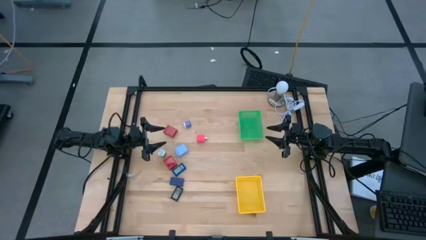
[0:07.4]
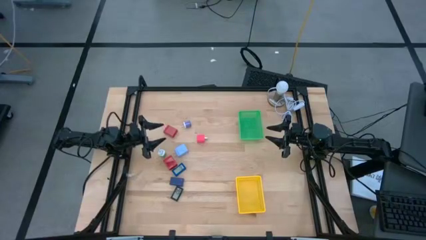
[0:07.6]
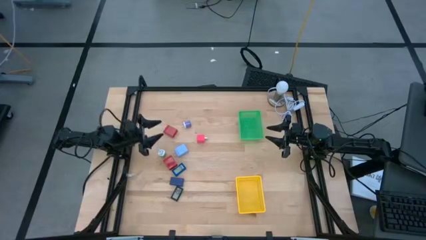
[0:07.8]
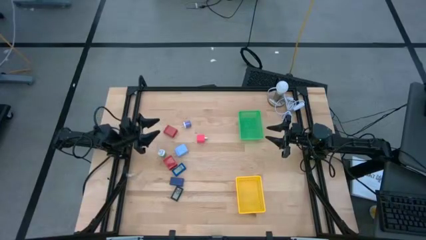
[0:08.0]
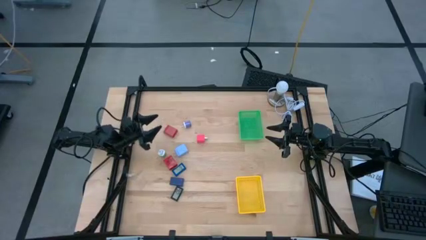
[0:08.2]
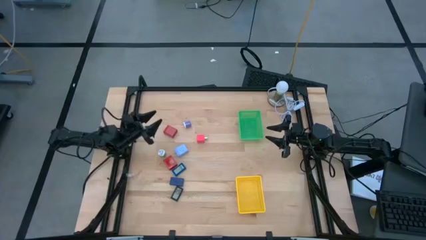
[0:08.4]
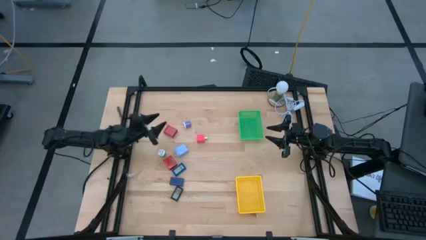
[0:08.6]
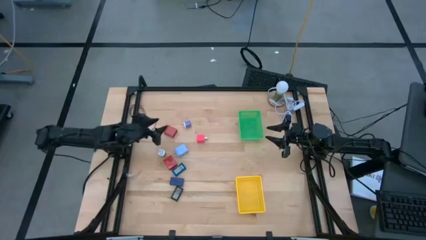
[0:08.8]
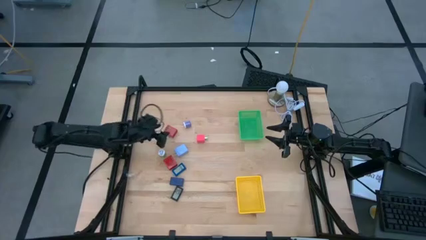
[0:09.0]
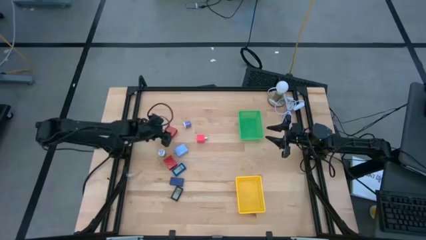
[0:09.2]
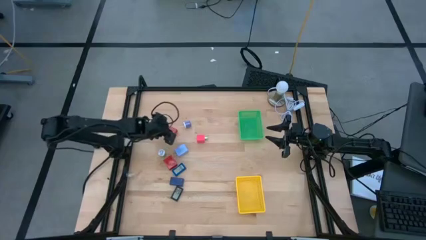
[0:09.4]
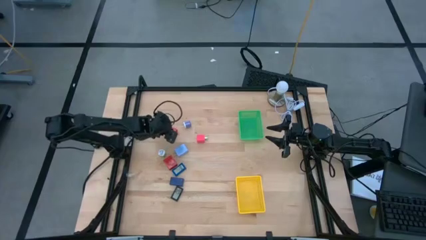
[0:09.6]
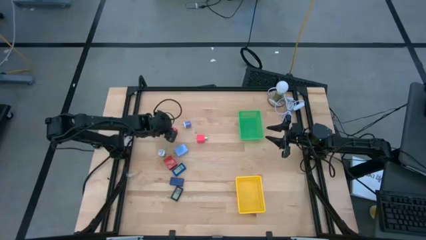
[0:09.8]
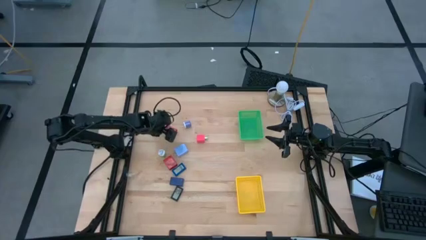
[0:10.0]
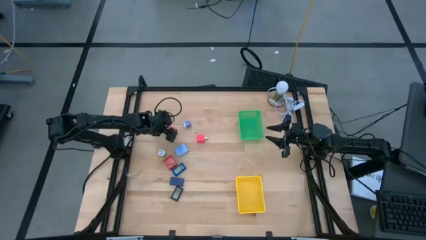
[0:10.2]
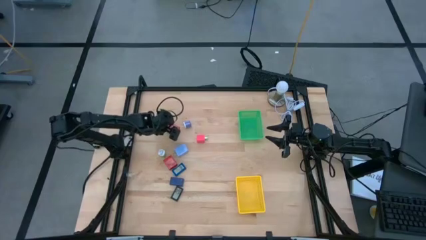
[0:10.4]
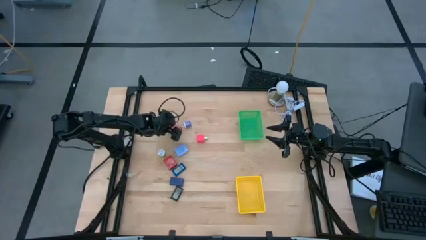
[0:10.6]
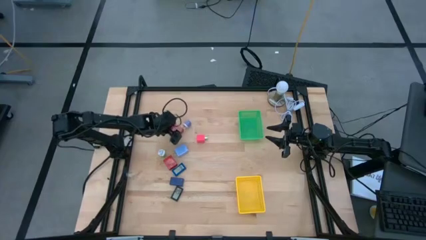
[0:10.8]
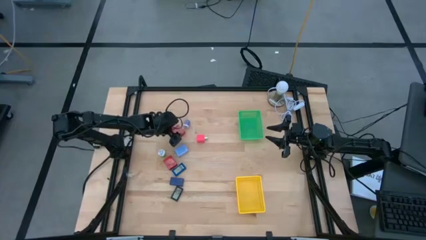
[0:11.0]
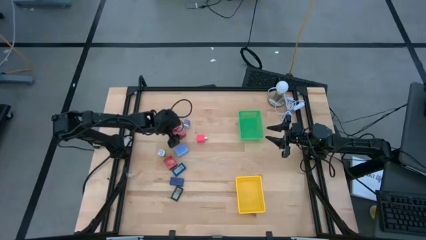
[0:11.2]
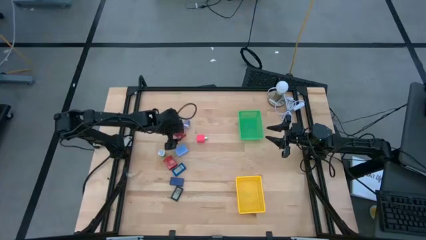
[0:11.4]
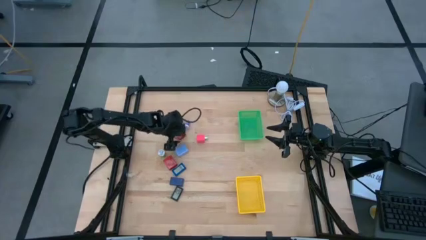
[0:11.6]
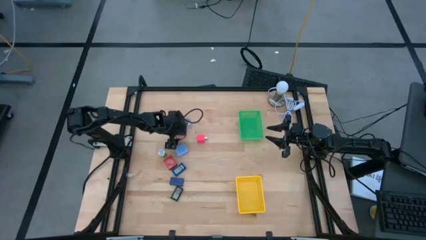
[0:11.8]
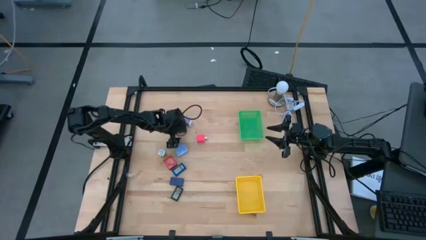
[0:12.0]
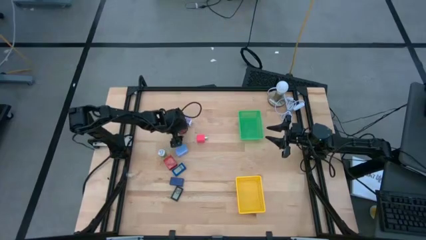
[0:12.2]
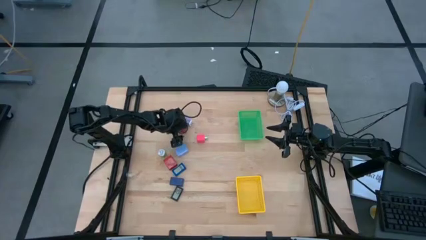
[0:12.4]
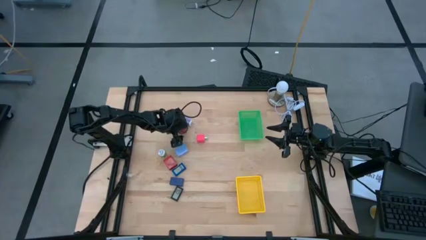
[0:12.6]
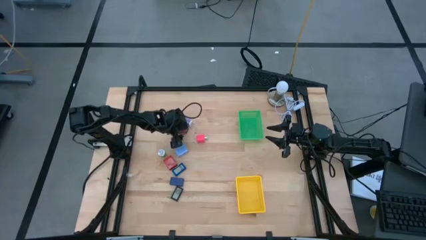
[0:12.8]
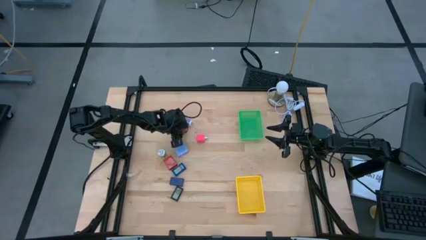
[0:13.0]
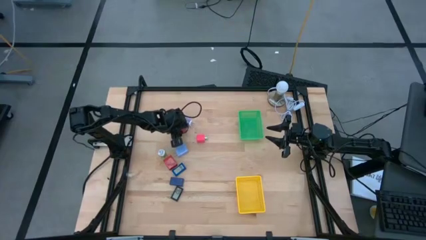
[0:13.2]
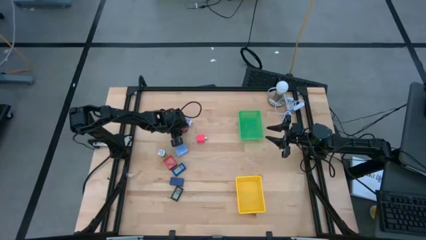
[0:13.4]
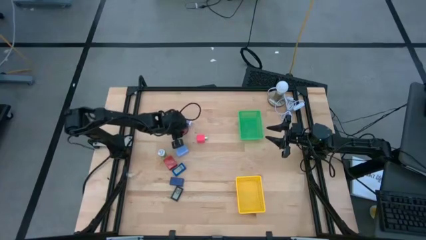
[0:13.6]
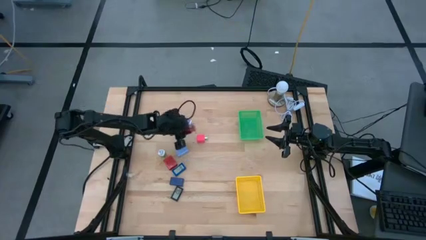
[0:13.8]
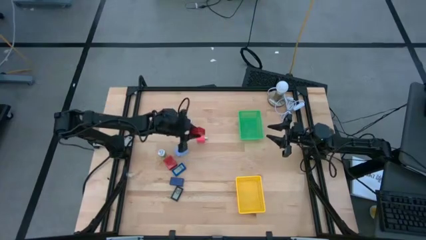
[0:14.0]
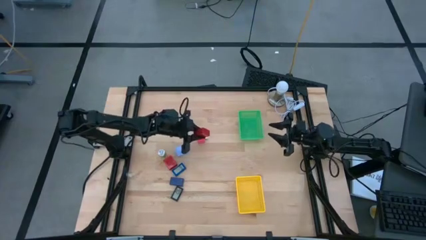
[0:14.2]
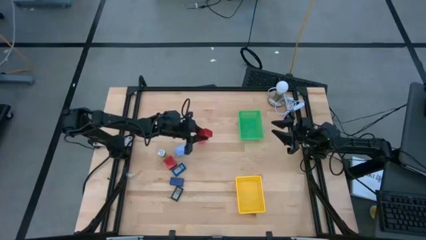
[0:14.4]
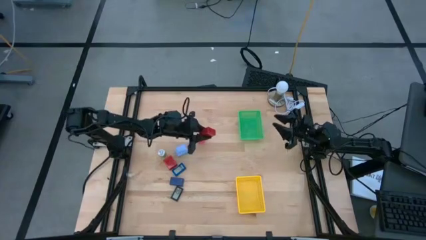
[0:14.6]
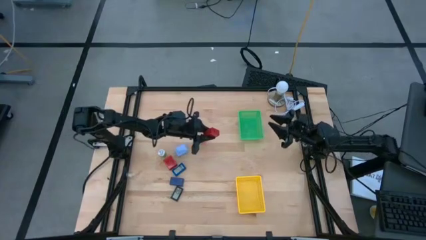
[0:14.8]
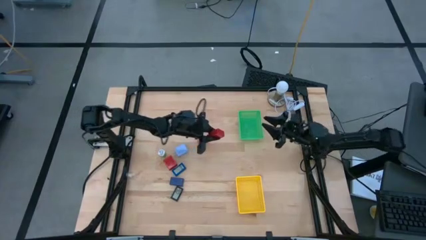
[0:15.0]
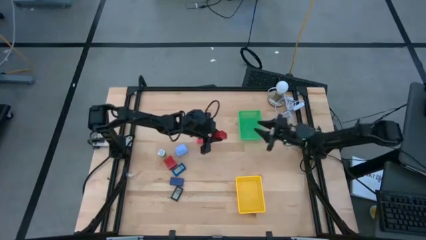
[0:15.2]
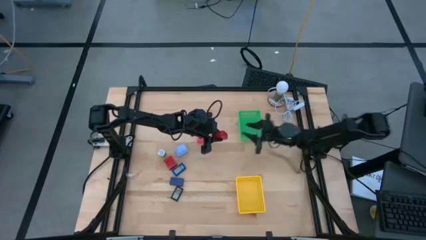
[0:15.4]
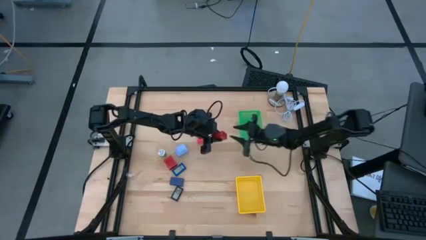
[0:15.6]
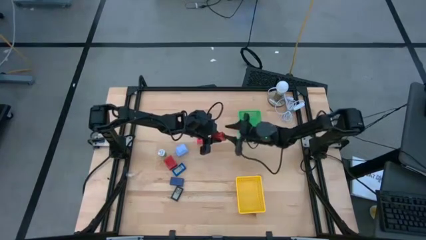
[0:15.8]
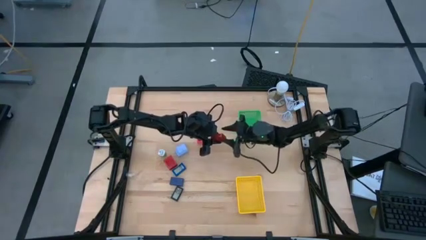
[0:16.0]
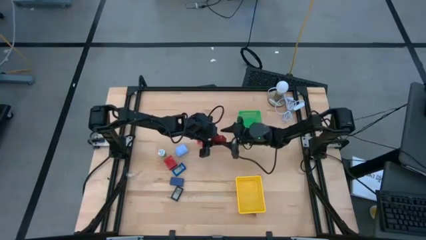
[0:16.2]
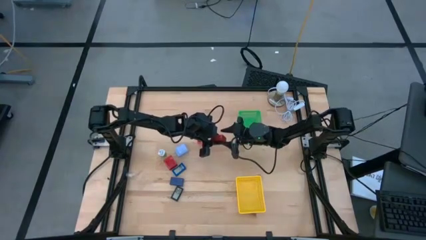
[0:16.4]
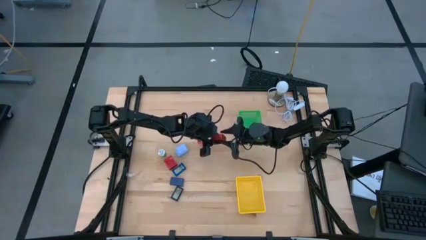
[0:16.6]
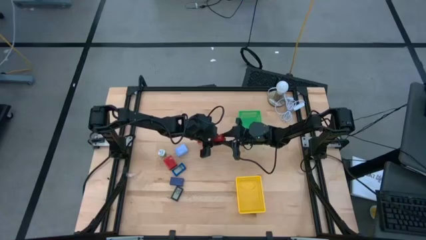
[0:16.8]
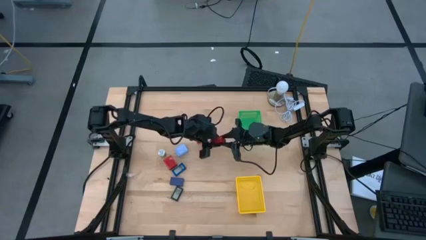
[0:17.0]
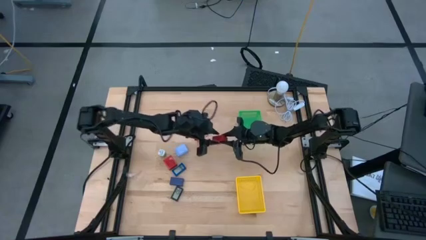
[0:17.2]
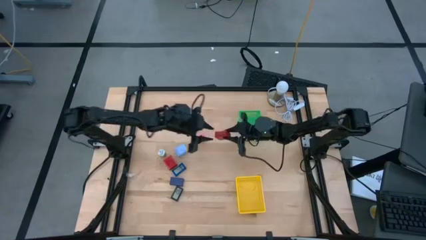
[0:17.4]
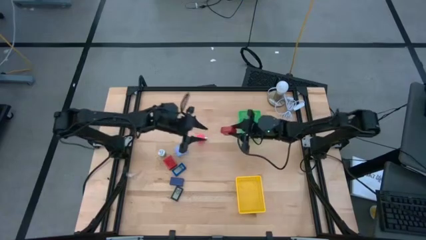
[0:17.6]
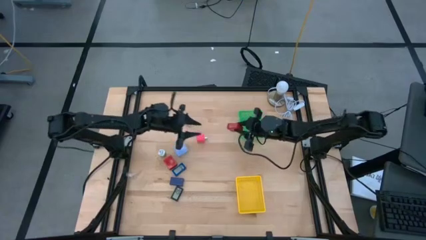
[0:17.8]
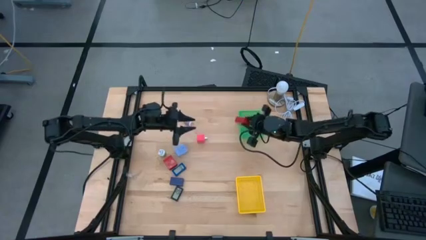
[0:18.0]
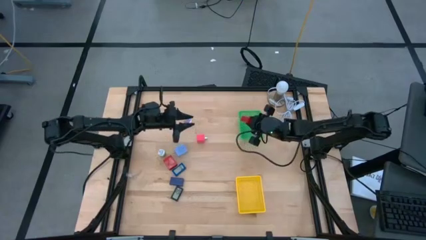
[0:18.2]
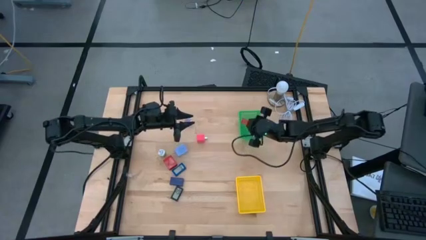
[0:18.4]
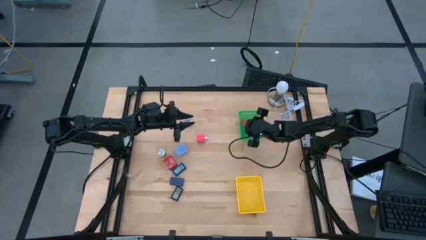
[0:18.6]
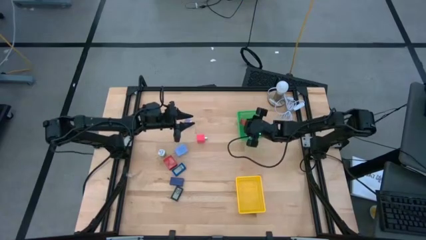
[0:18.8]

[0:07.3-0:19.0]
Task: Pick & Place Office items
Put the top red charger adapter into the green bin

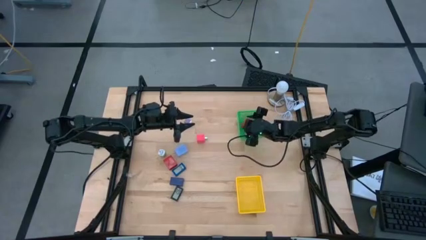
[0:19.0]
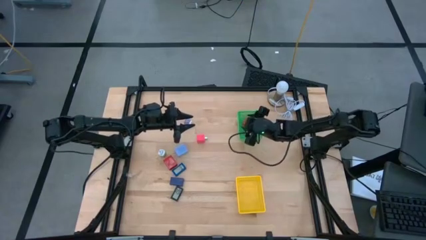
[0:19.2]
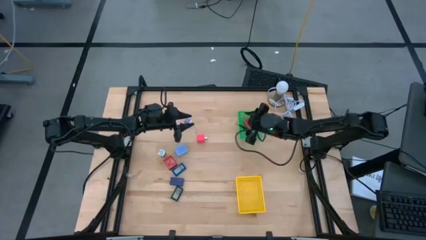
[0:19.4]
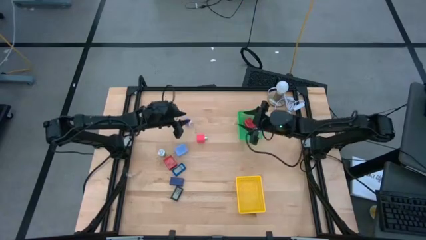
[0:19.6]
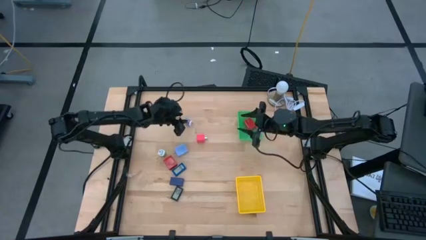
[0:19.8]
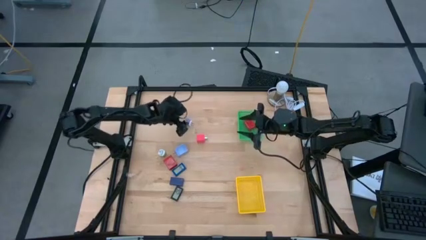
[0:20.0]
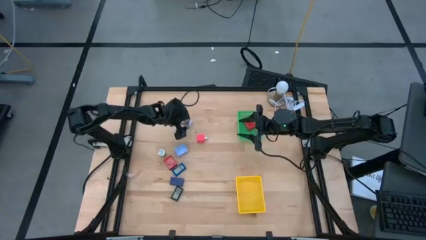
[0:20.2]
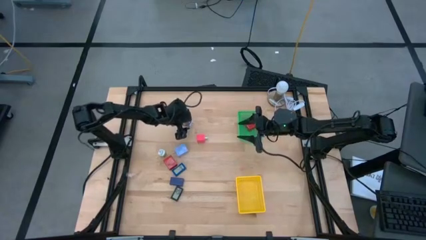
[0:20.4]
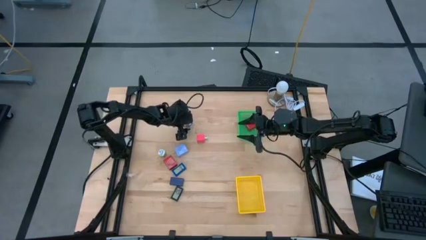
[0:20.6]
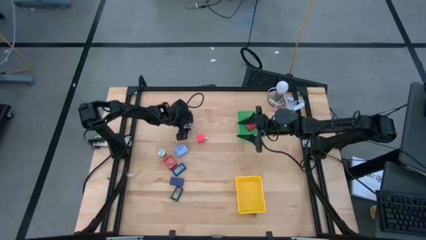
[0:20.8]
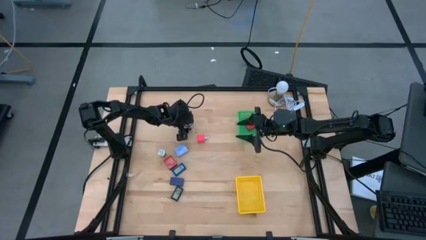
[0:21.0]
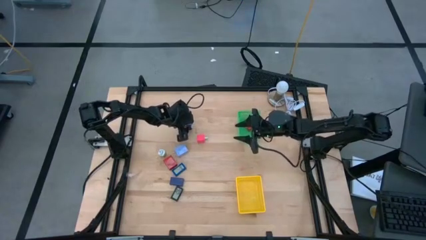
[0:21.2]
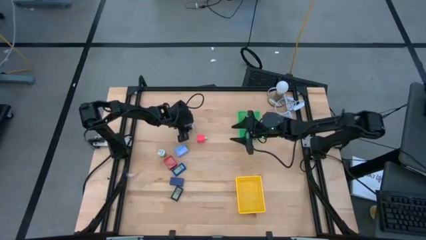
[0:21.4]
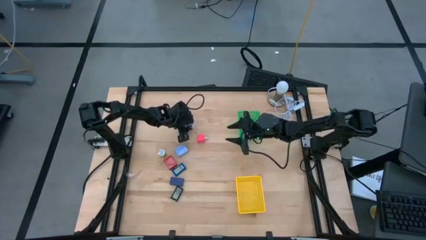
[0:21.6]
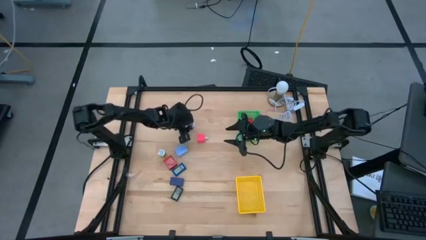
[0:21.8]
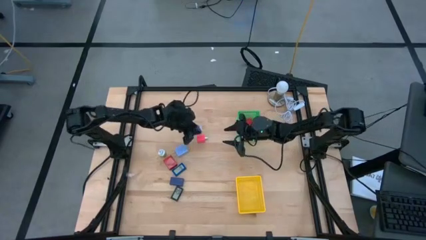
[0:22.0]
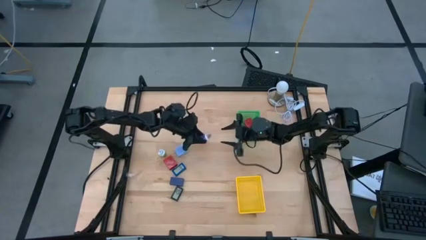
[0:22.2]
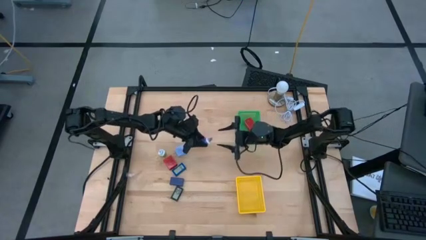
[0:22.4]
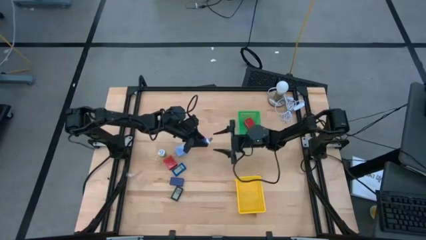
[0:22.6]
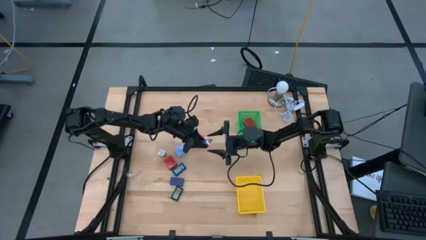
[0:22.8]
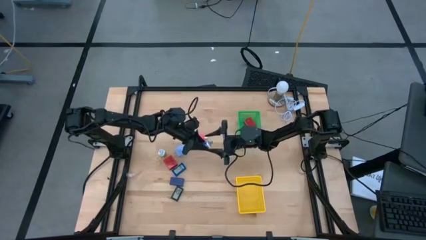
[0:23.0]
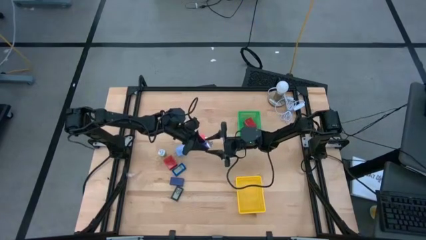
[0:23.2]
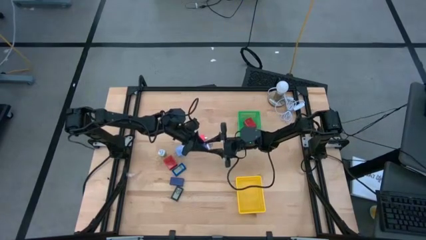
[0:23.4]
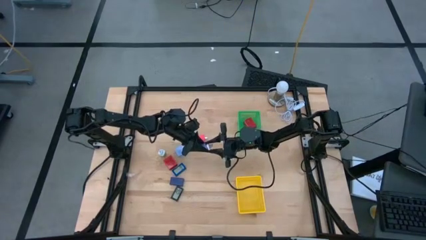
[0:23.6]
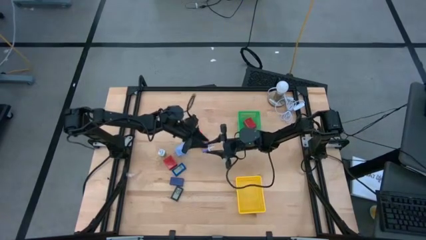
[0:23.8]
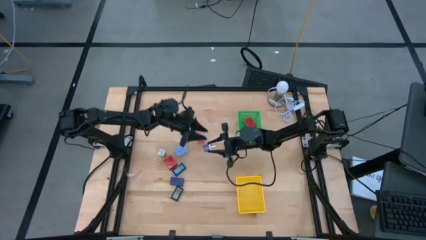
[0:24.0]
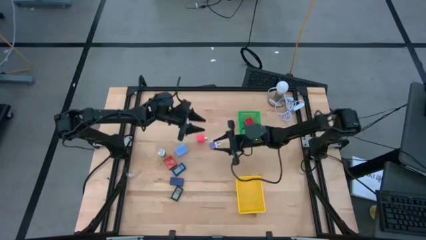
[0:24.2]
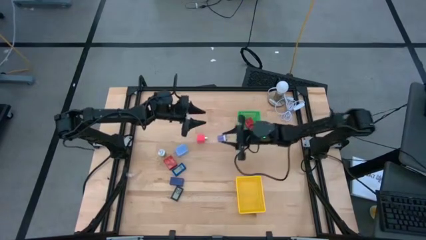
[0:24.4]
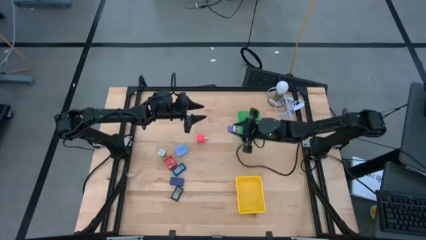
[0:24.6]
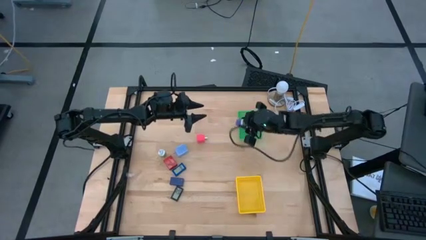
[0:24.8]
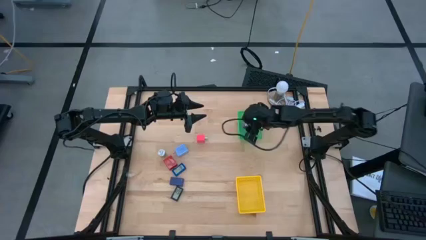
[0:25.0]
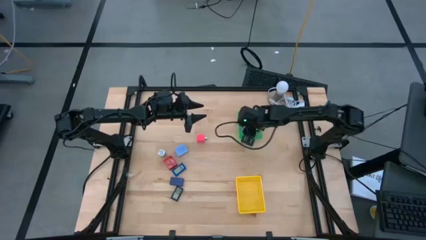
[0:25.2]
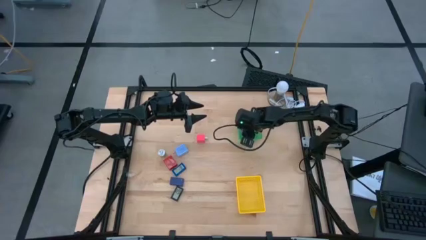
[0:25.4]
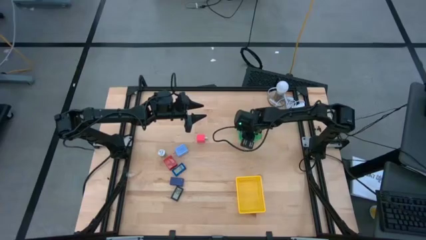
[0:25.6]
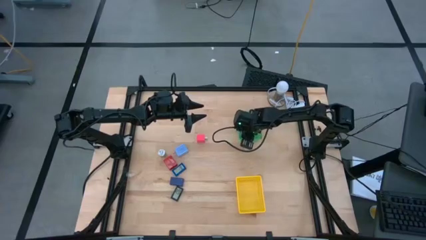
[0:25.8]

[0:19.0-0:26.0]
Put the purple charger adapter into the green bin
